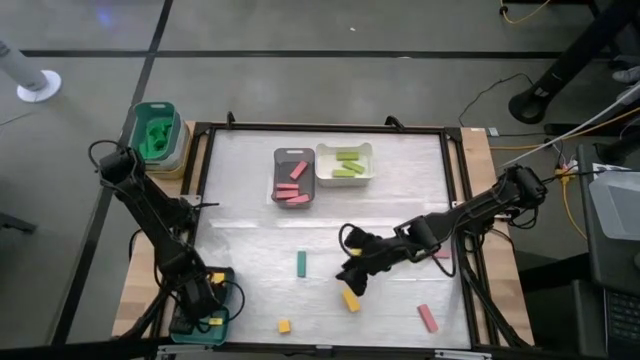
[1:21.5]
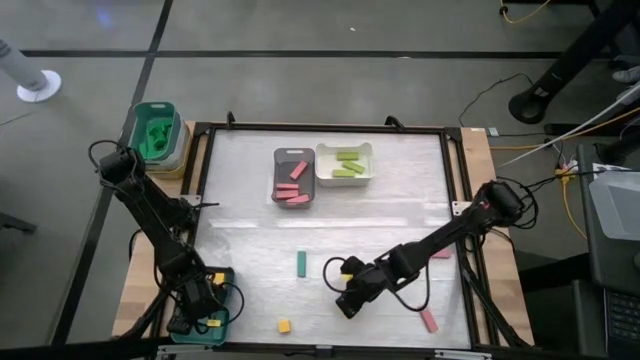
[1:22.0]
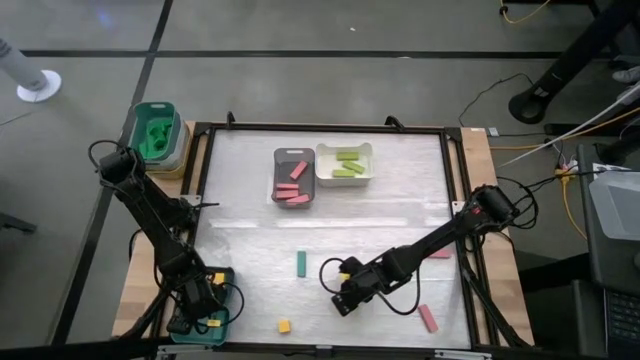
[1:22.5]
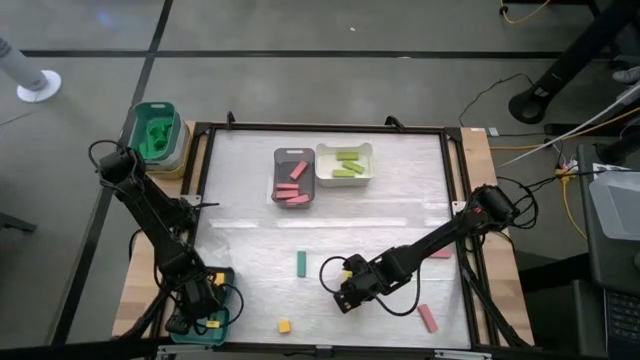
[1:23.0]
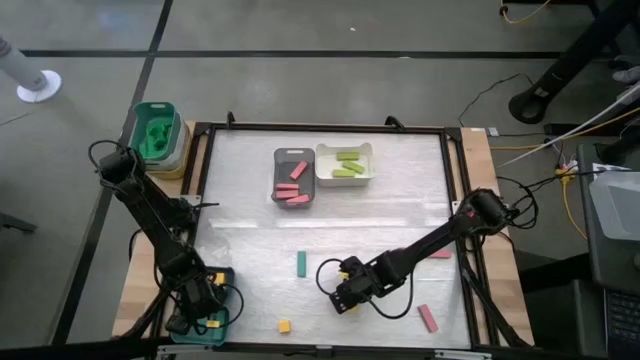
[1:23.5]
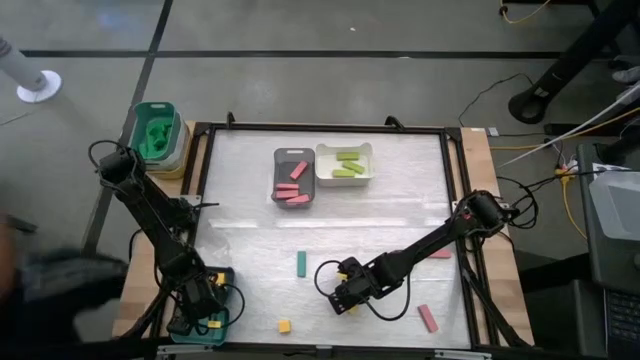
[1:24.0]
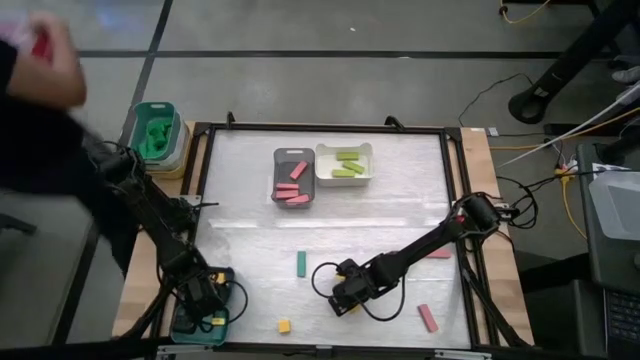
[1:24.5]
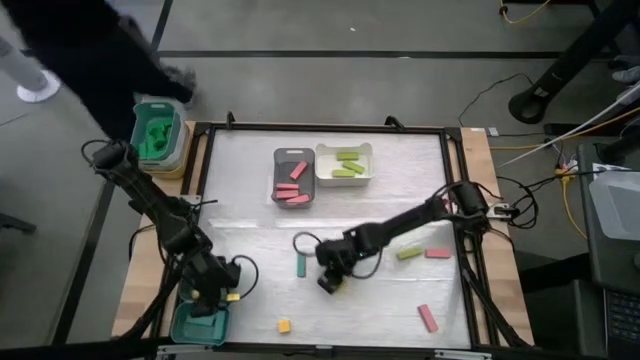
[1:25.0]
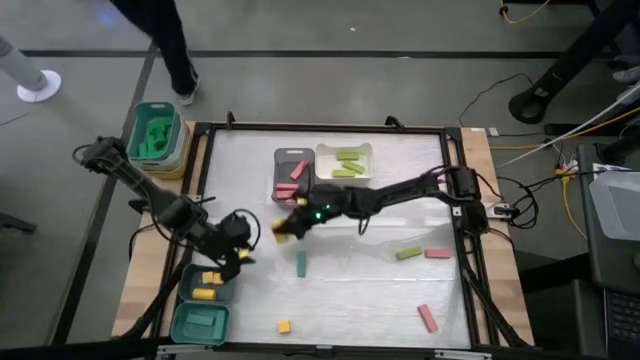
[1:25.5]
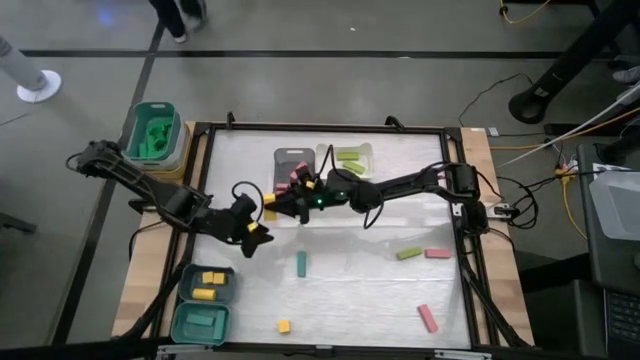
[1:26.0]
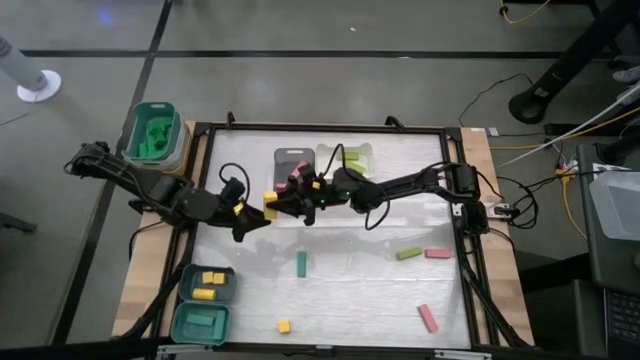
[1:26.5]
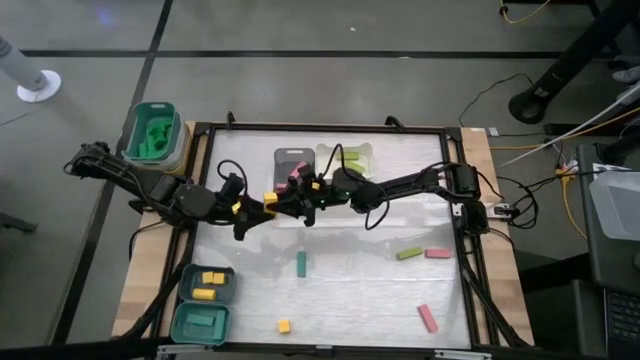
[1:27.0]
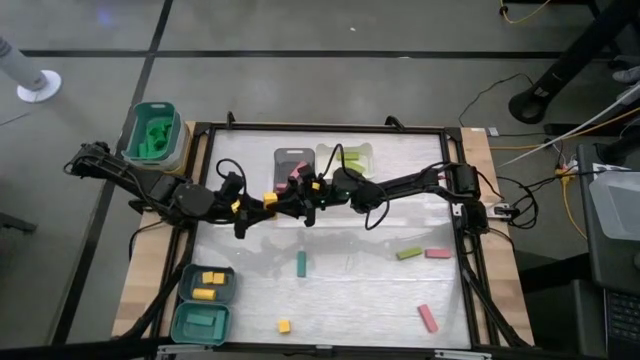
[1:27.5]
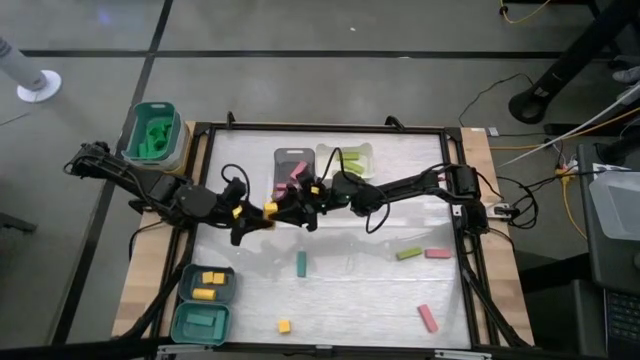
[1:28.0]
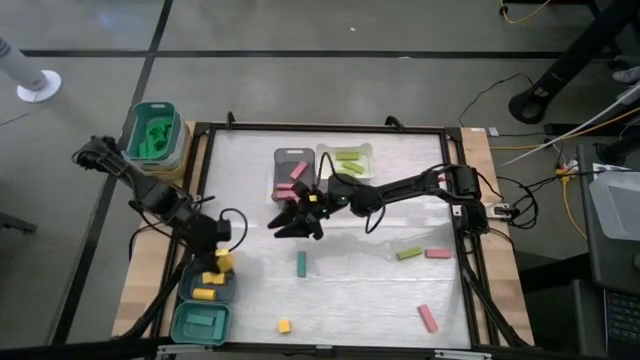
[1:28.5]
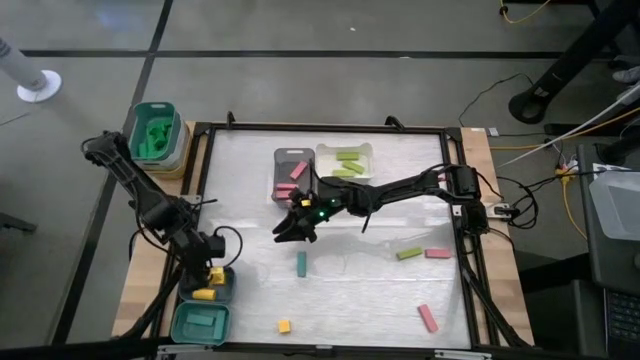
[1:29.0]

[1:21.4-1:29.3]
Task: Sort blocks
Put the yellow block into the blue bin

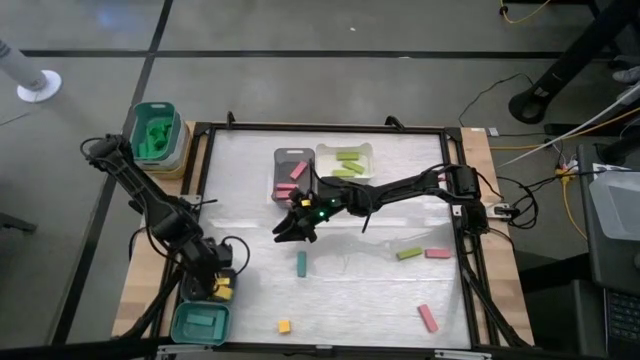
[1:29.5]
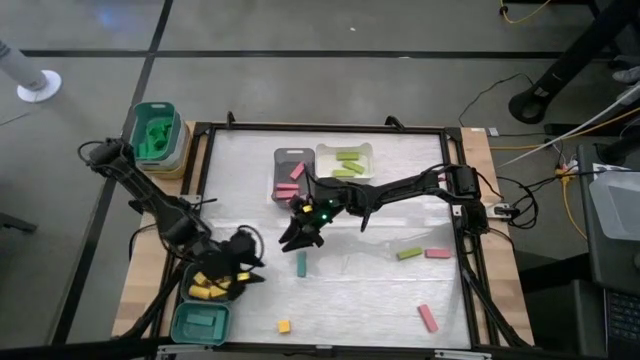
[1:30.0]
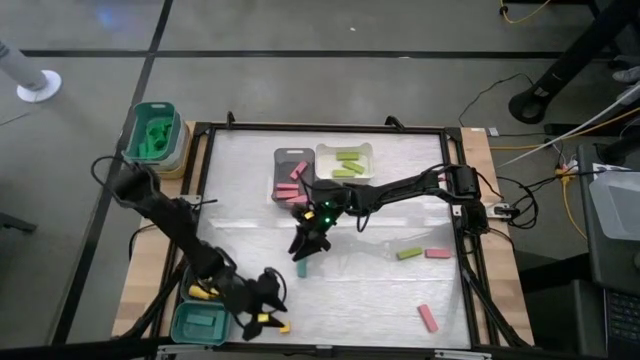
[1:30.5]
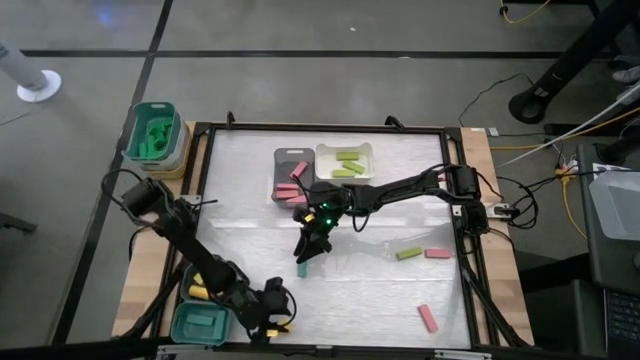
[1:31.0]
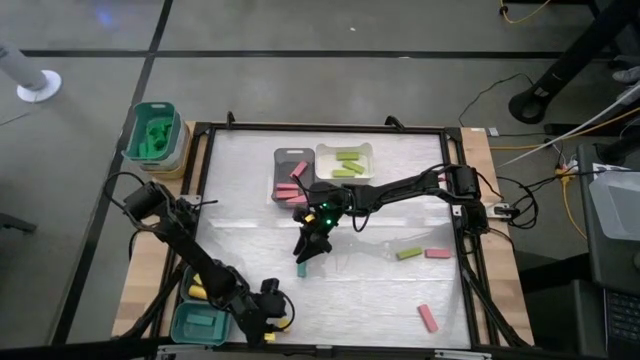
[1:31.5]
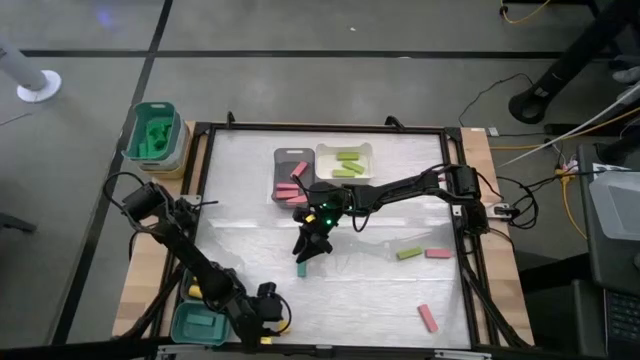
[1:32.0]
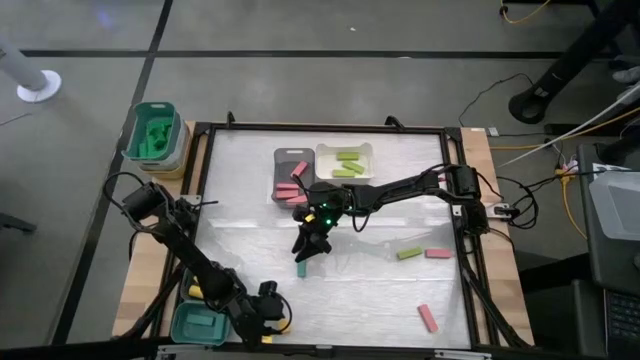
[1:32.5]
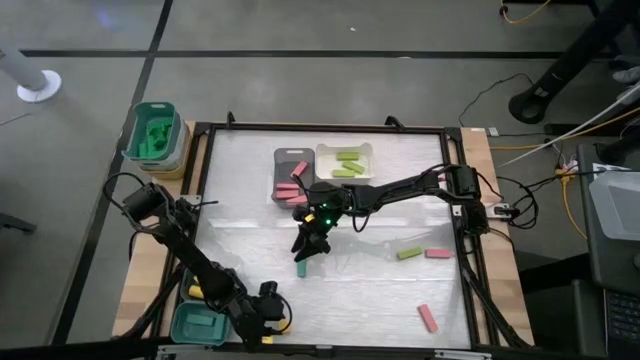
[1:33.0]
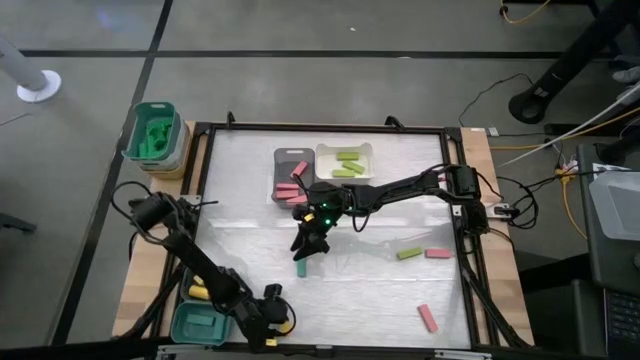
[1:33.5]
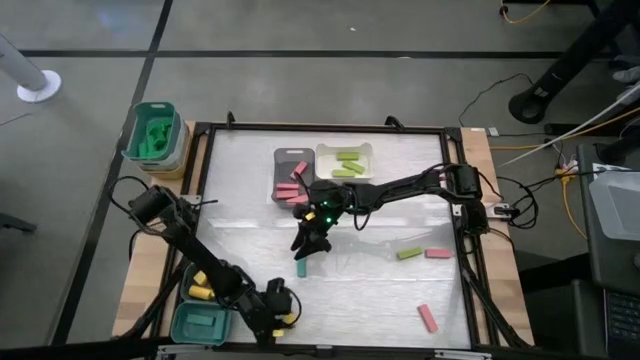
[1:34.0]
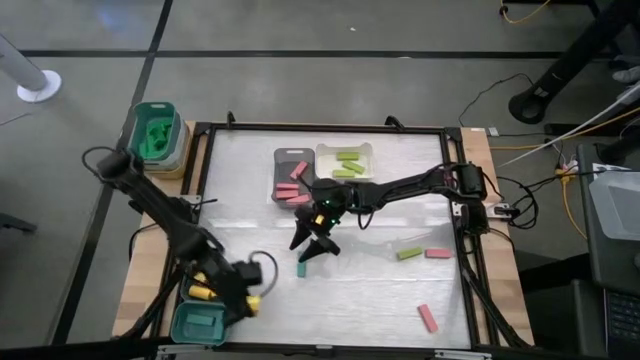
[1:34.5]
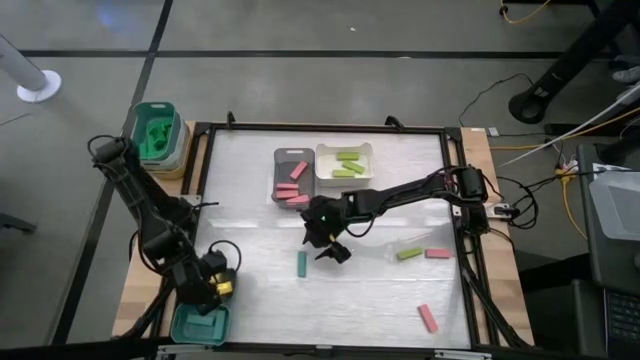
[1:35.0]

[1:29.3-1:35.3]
Put the yellow block into the blue bin

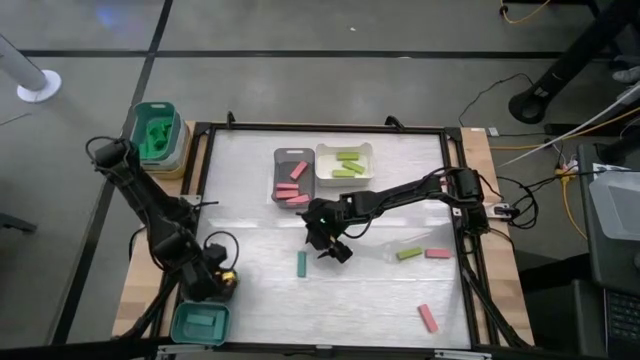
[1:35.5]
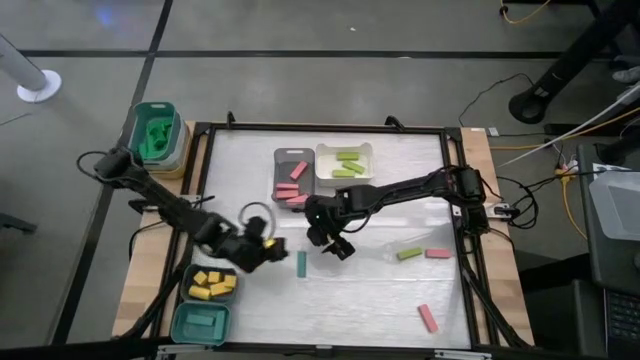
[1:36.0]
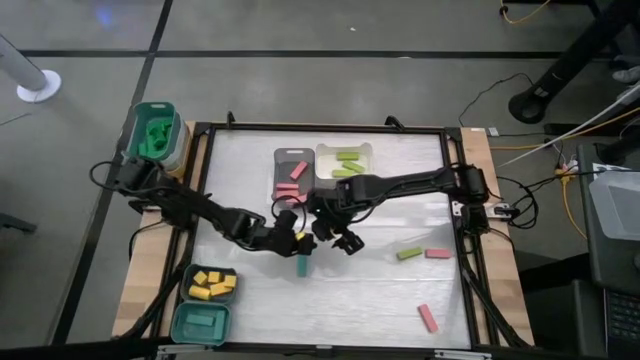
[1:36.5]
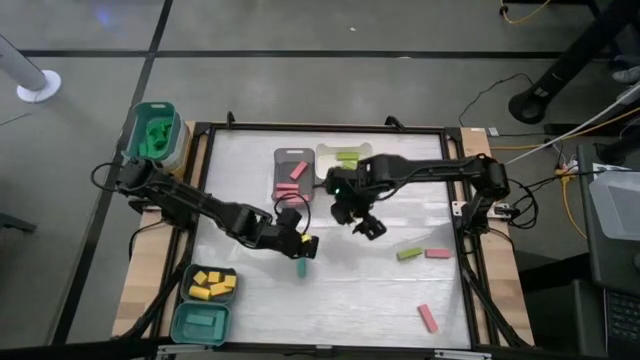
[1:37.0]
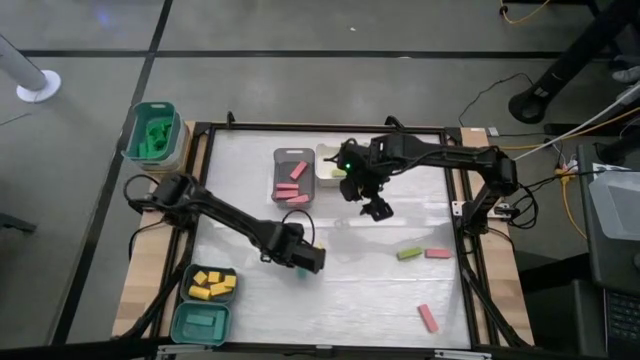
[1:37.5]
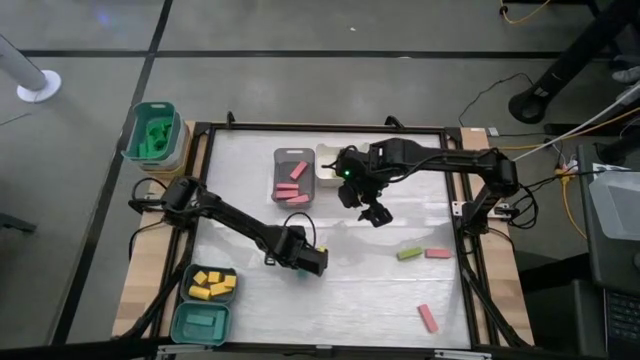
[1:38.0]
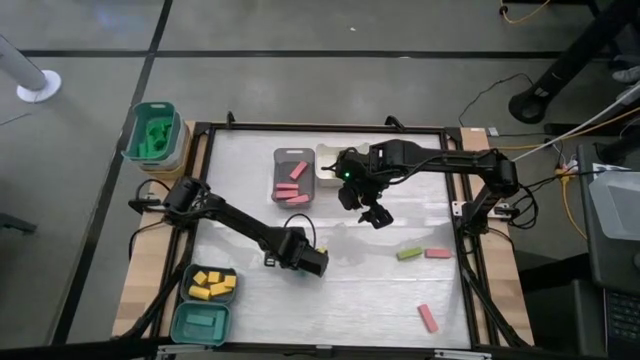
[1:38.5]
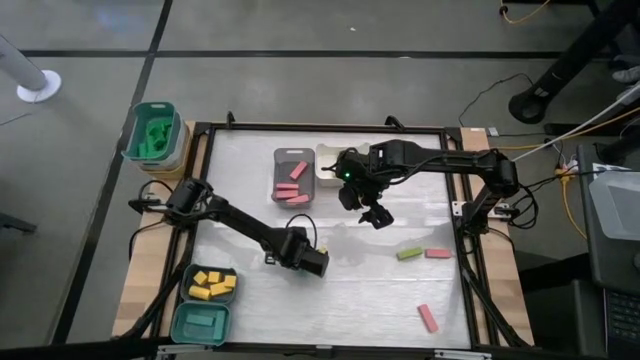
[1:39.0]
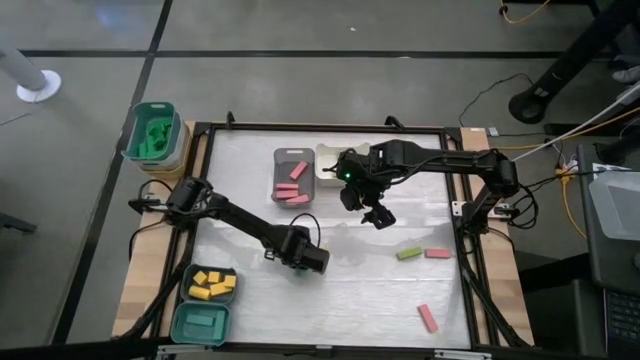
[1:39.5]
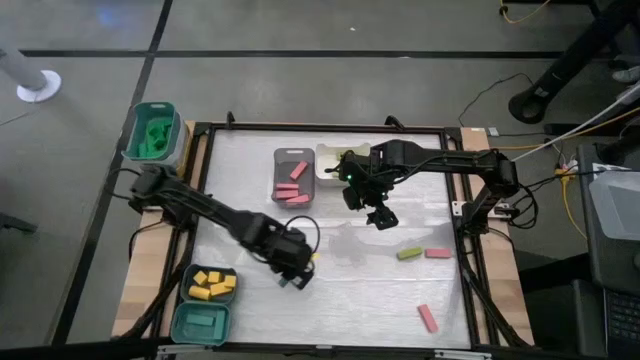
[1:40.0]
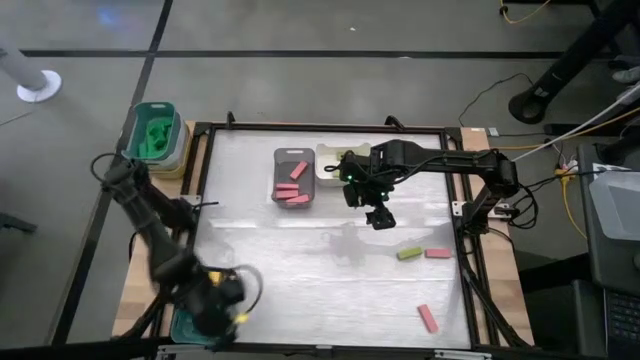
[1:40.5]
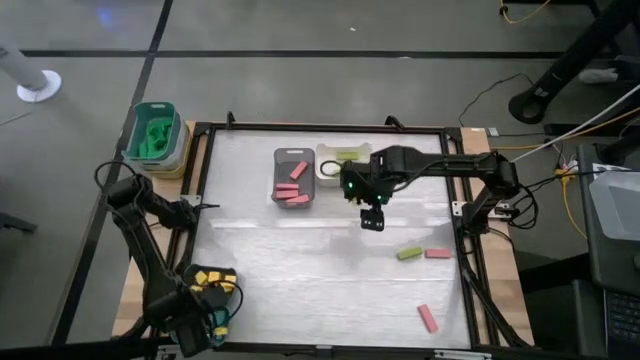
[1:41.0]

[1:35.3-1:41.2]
Put the light blue block into the light blue bin

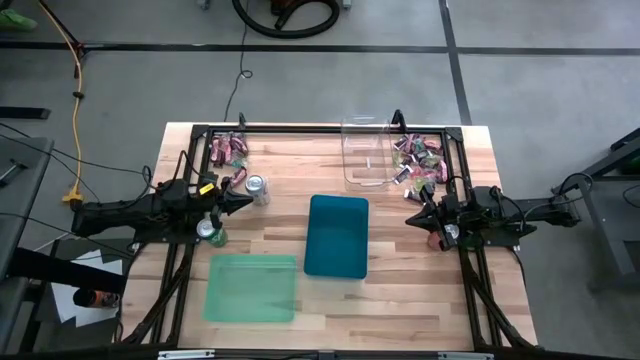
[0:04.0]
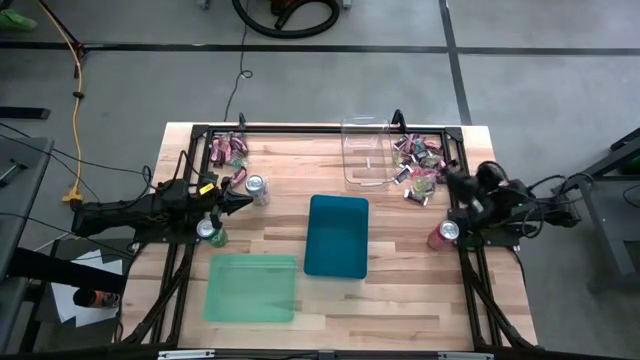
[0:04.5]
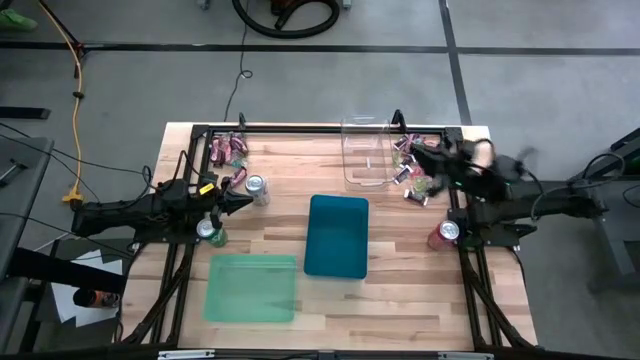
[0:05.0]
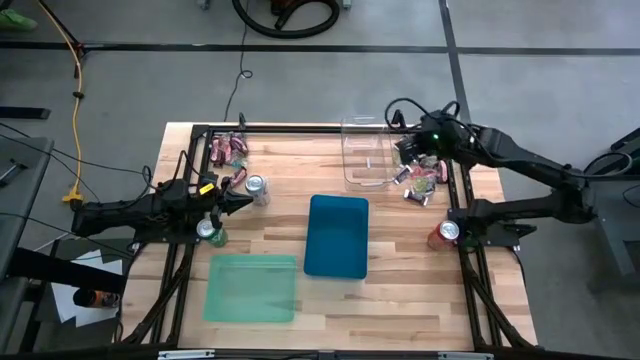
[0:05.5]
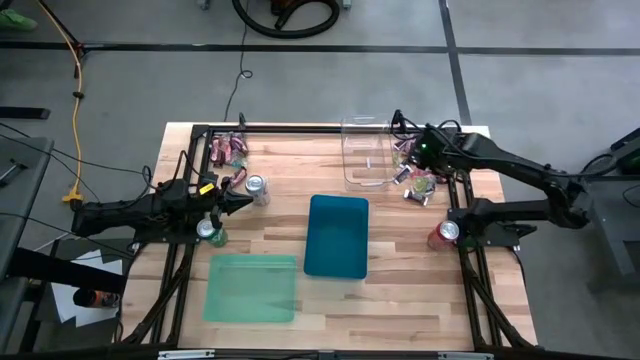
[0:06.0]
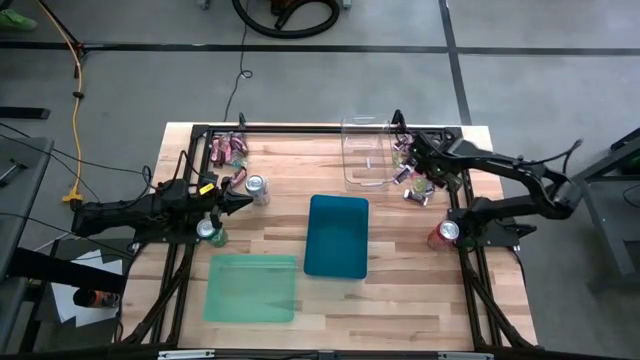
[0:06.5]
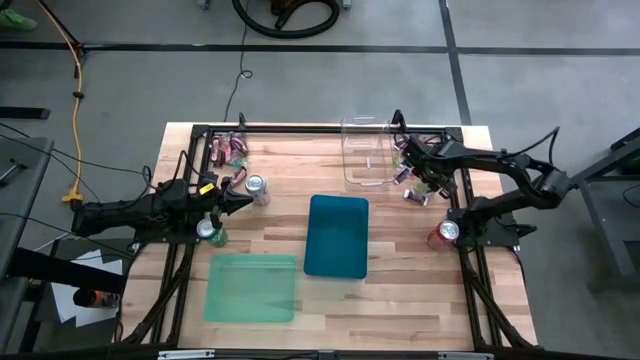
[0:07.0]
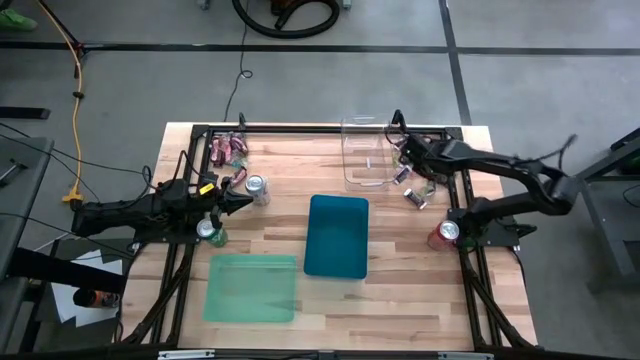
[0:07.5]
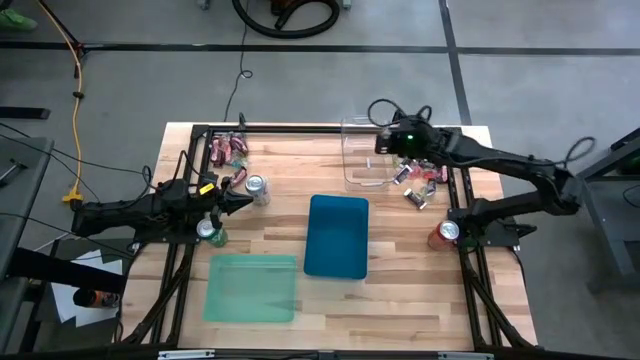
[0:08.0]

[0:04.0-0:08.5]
Task: Sort candy
Put the green gummy into the transparent bin
